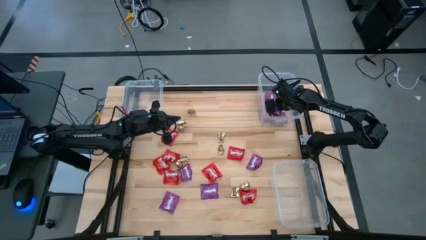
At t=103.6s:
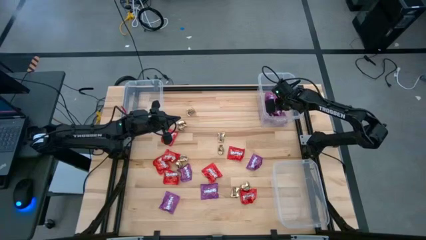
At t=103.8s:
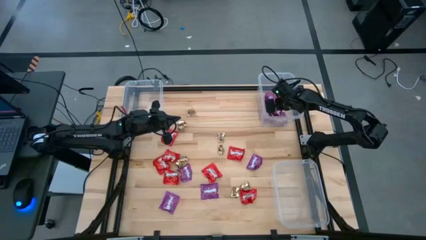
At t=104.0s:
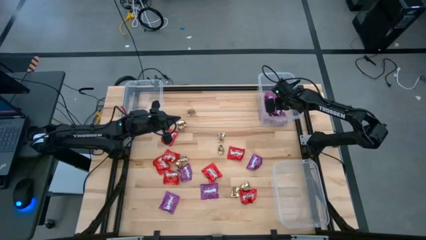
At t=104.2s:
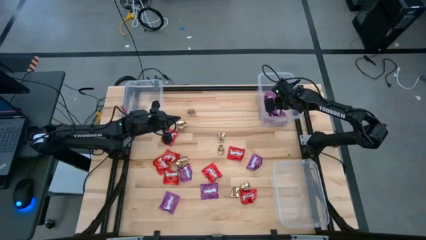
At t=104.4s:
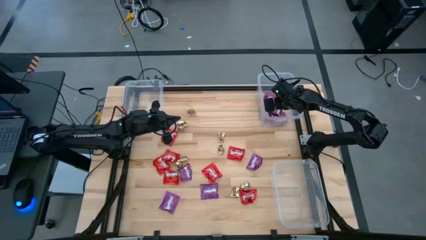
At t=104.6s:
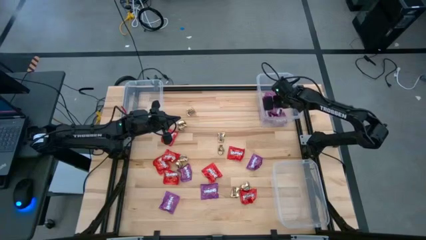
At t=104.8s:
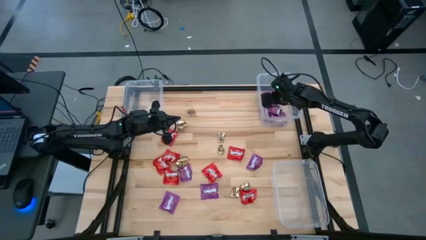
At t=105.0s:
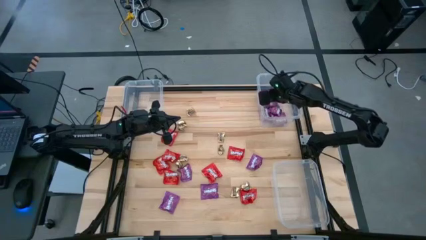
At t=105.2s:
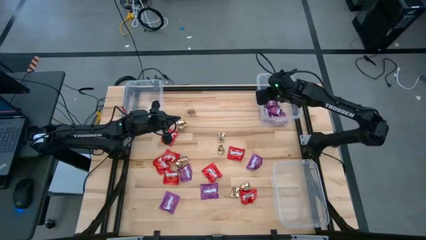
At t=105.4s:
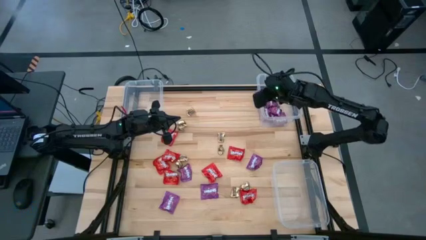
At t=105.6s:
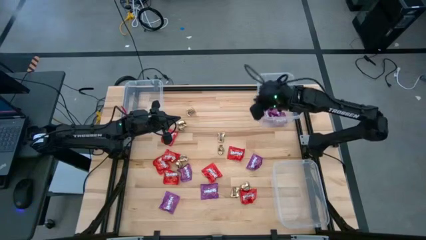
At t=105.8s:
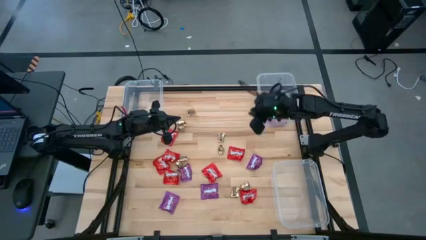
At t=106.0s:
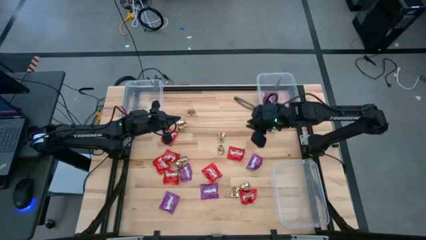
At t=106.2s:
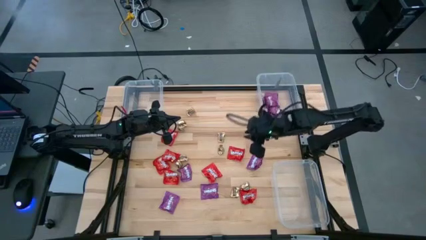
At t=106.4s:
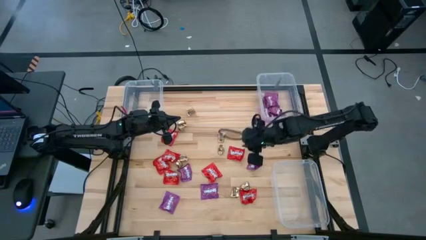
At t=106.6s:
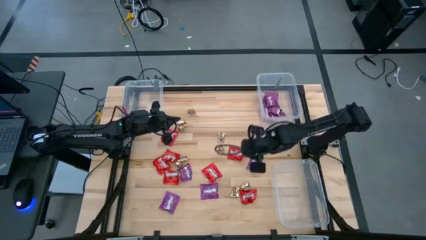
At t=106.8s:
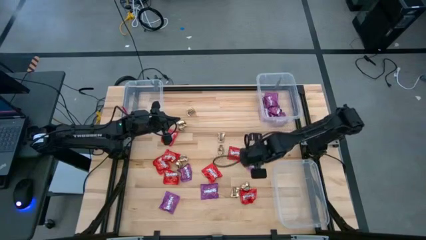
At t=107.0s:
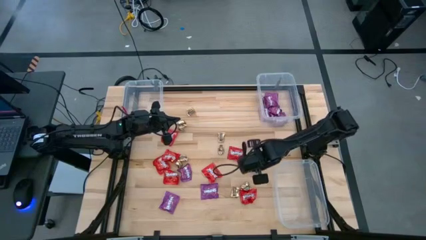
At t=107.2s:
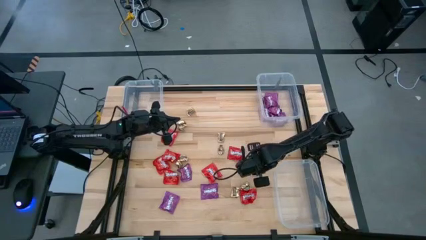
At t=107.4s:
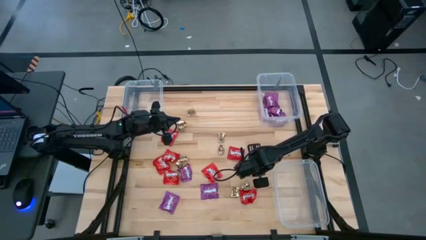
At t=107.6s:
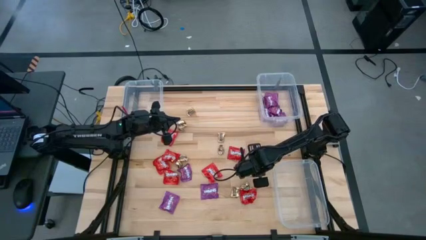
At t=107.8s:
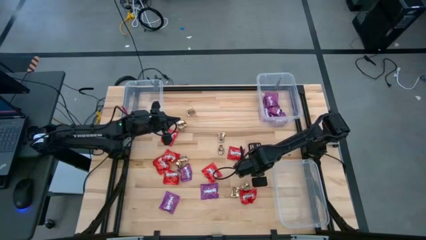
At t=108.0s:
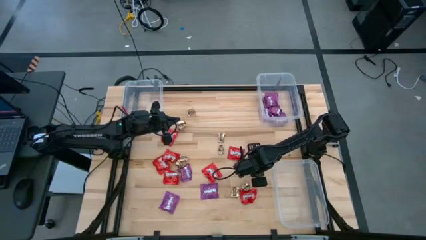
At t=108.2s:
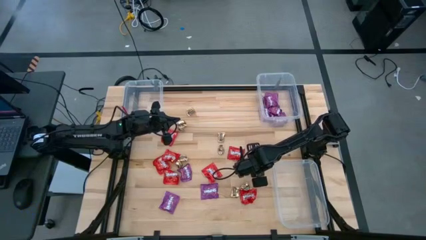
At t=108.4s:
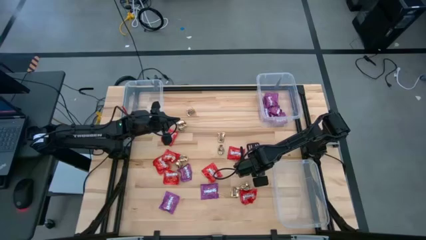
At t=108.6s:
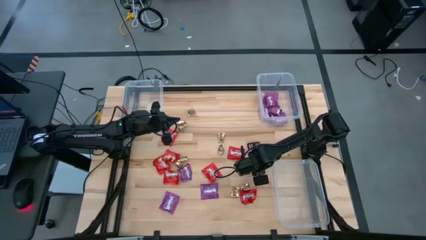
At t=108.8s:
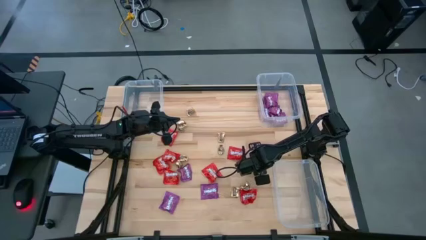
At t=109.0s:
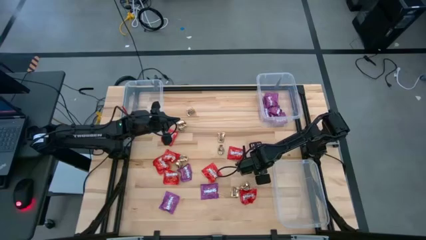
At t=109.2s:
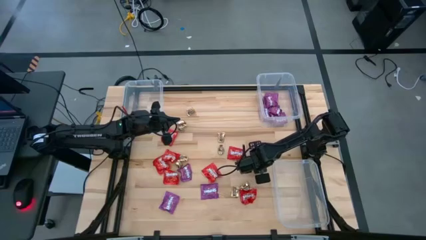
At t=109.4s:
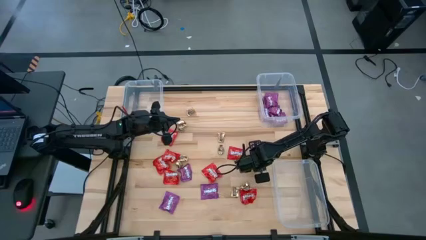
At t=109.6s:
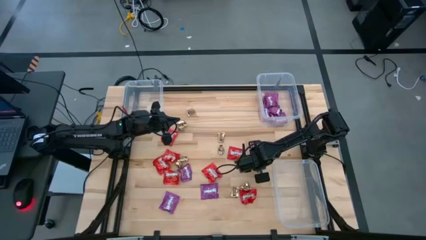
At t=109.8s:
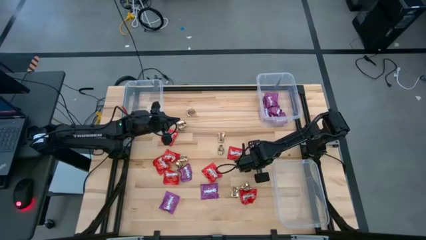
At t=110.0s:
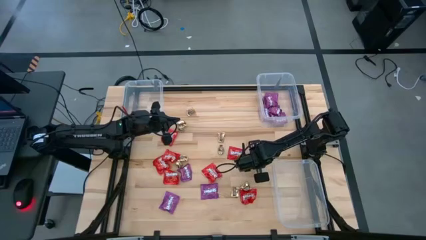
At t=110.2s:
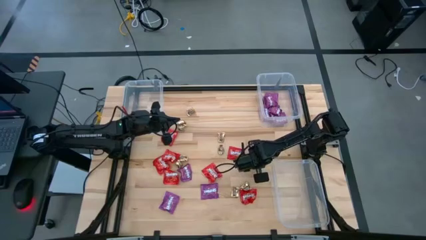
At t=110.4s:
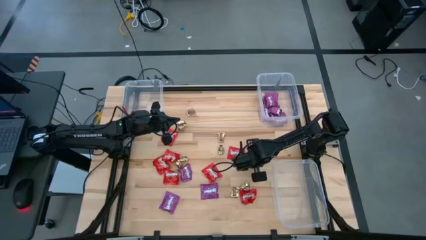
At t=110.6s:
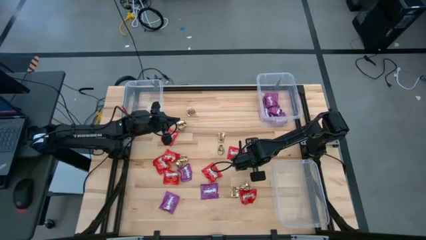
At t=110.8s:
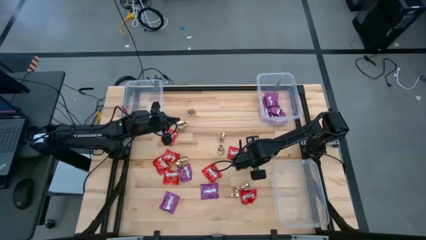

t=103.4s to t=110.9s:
Task: Sort candy
Put the purple candy into the top right transparent bin

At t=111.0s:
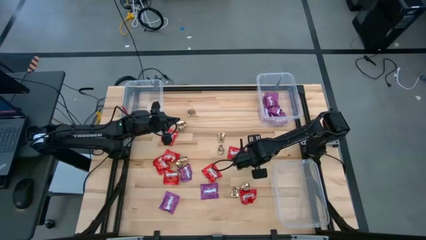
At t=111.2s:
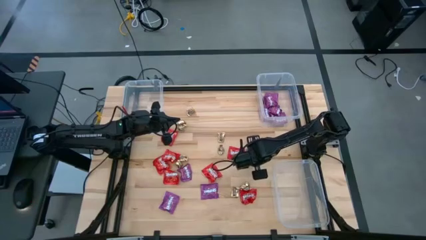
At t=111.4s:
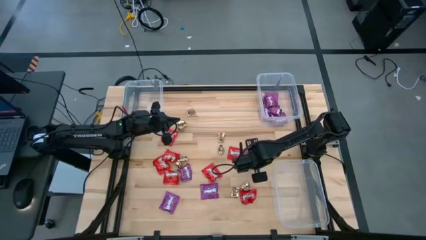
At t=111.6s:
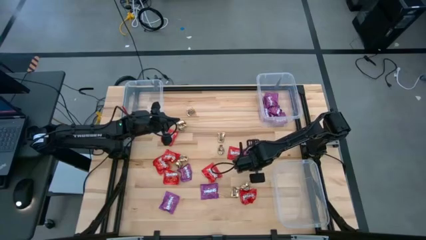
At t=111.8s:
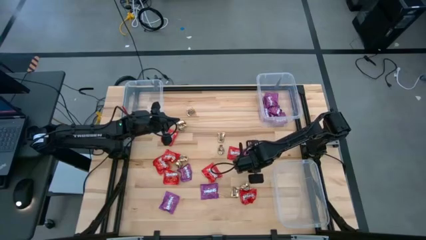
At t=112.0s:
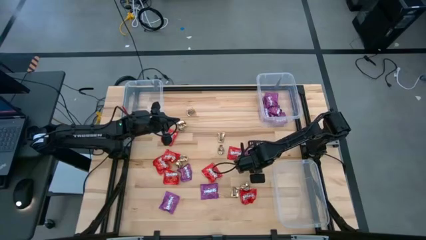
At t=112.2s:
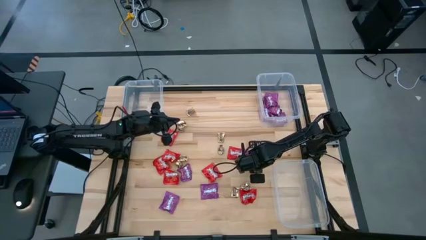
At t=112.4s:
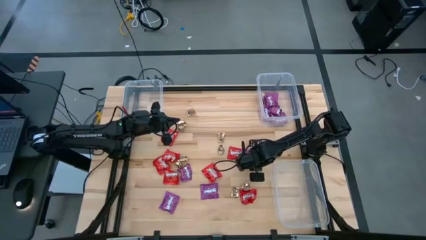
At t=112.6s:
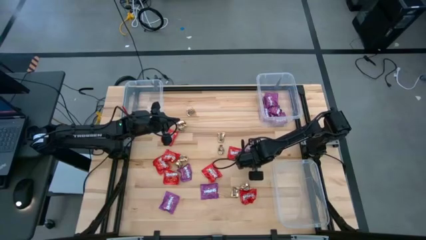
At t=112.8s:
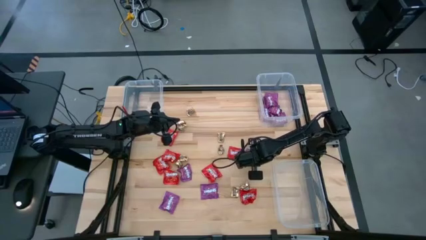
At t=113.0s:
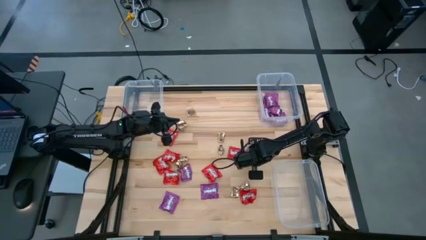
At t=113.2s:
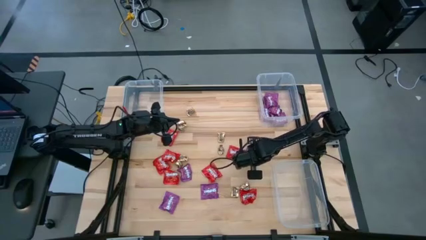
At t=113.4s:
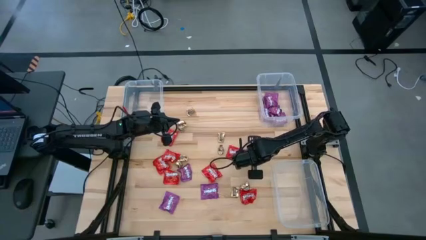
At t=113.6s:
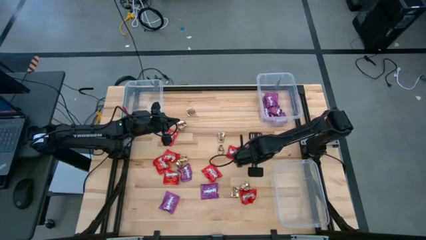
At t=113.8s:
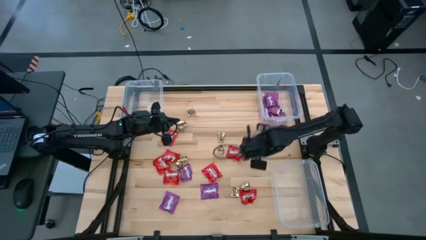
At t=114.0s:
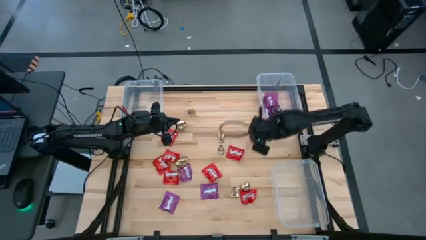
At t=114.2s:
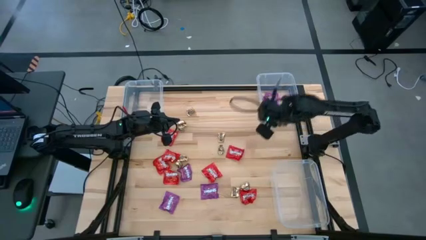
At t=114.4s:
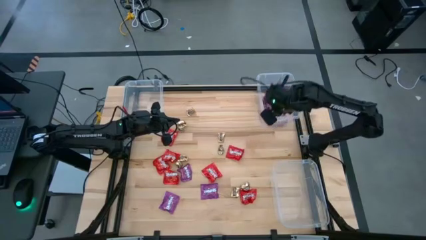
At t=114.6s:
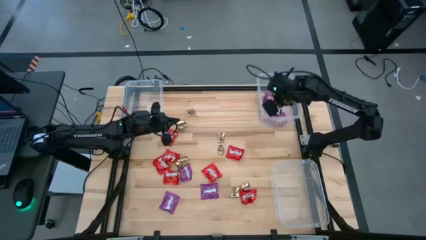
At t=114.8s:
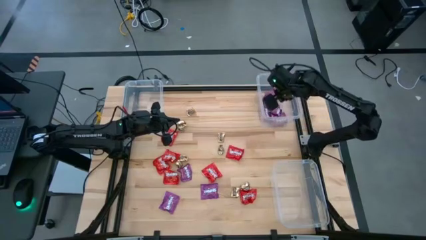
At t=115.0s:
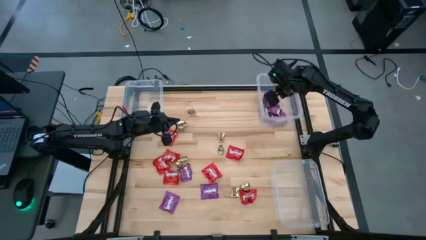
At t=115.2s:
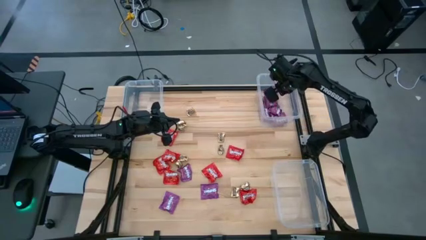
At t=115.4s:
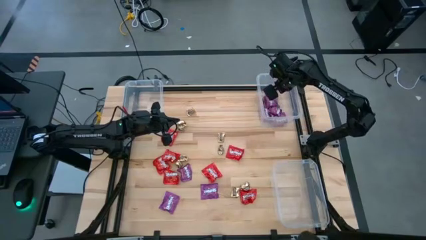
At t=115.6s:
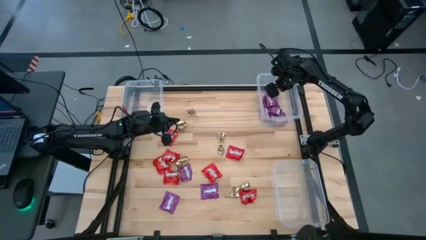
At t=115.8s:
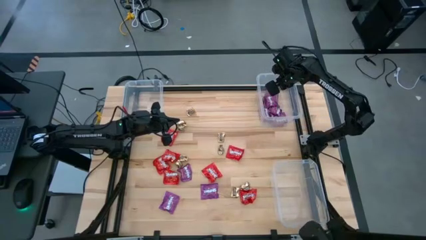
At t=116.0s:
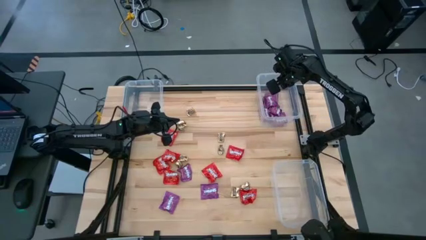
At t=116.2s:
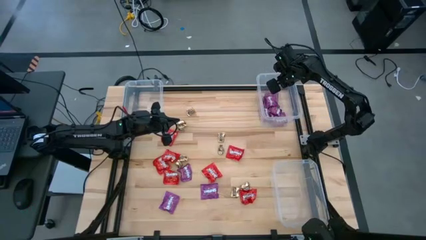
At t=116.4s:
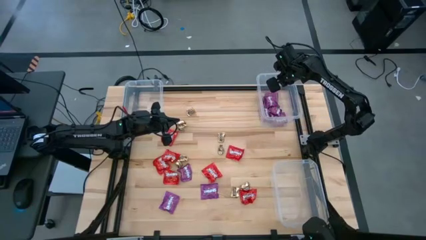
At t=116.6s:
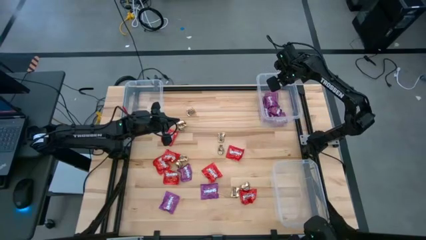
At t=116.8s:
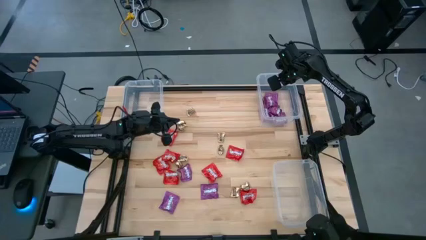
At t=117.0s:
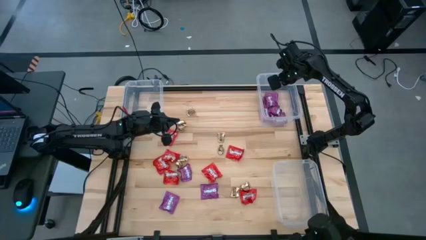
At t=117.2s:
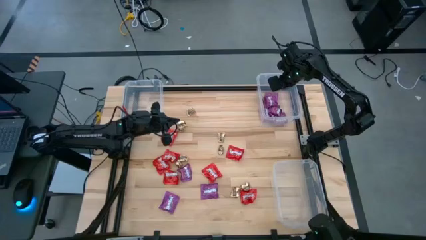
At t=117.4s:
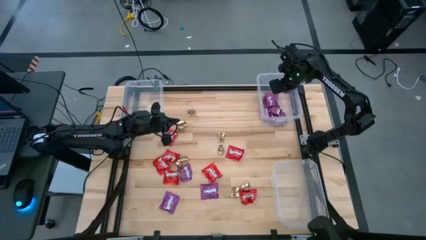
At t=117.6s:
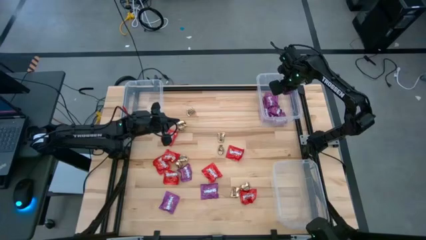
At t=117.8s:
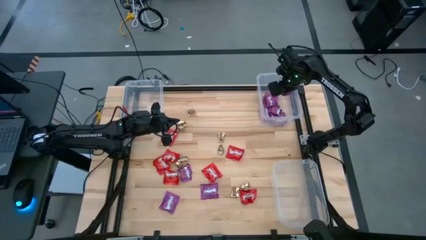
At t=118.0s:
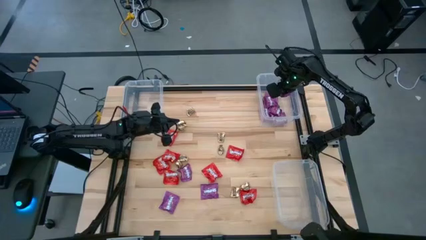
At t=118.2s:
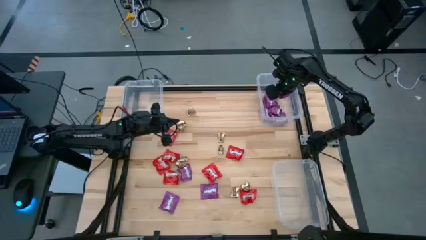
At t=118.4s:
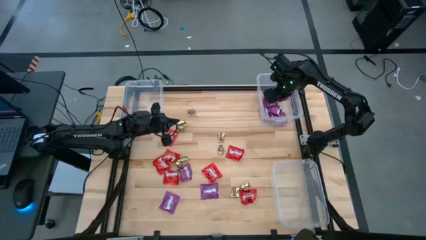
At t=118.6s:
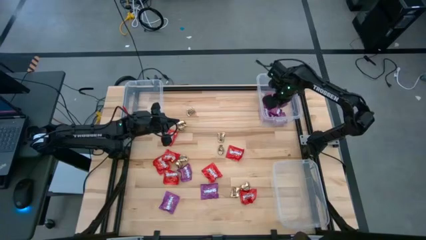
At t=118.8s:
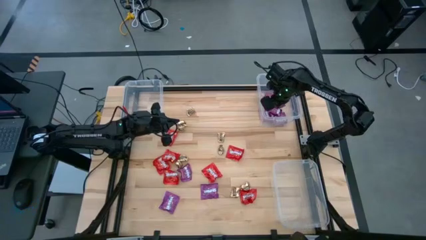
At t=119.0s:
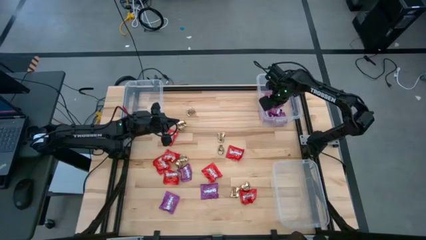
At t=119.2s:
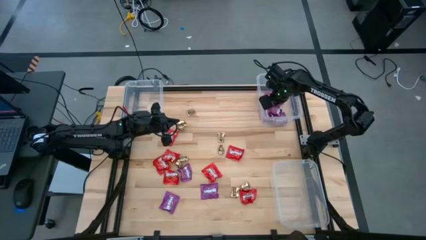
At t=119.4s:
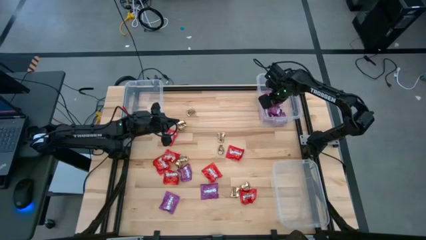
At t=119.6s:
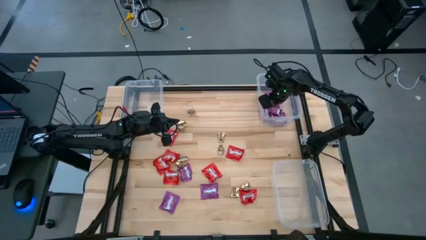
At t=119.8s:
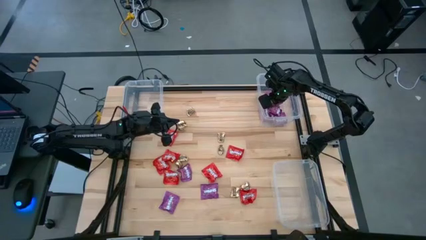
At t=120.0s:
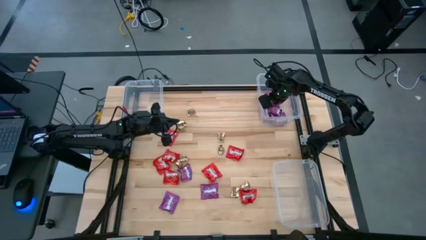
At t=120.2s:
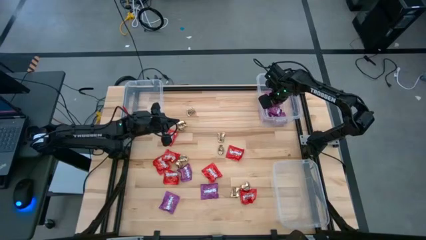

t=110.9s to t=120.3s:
Put the purple candy into the top right transparent bin

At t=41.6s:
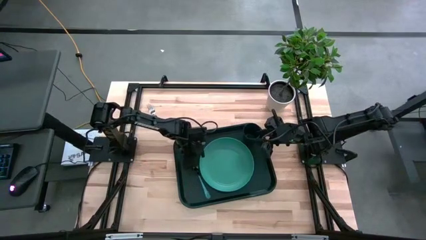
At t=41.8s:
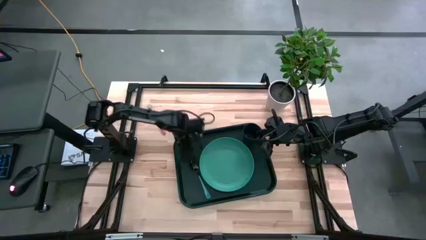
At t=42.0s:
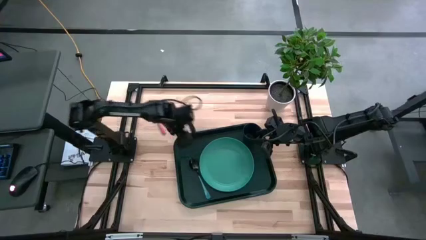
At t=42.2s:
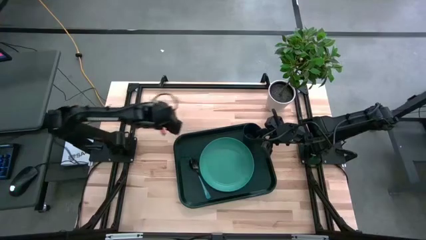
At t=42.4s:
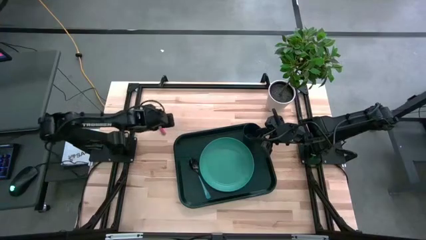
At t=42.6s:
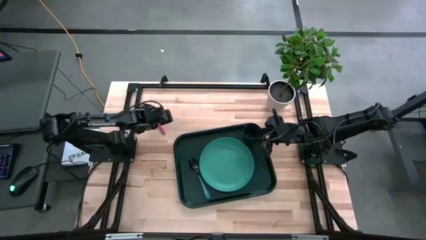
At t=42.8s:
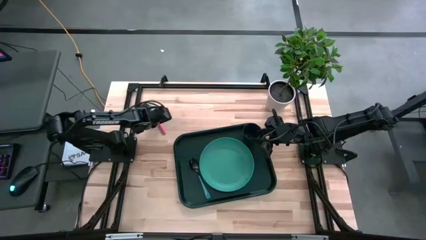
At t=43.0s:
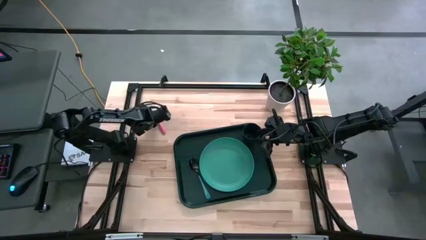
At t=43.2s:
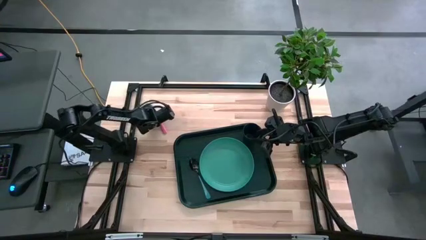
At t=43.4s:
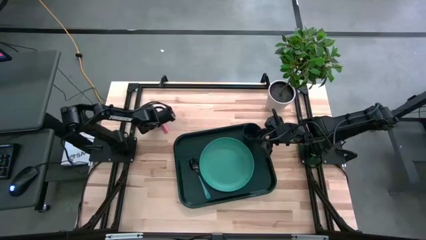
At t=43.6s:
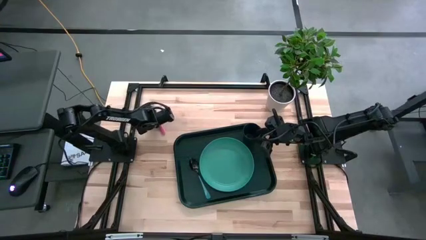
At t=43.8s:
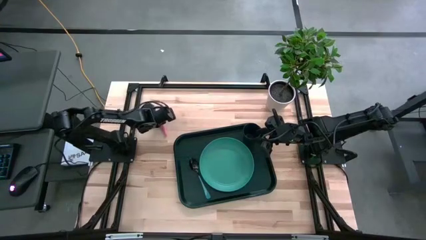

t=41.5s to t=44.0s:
Task: Pick and place plate/cup/fork/spoon on tray
Put the pink fork on the black serving tray to the left of the blue spoon
